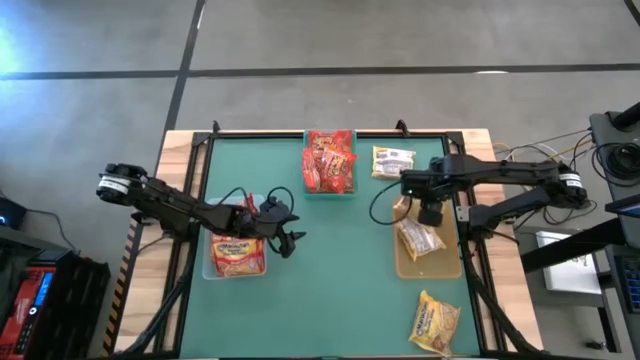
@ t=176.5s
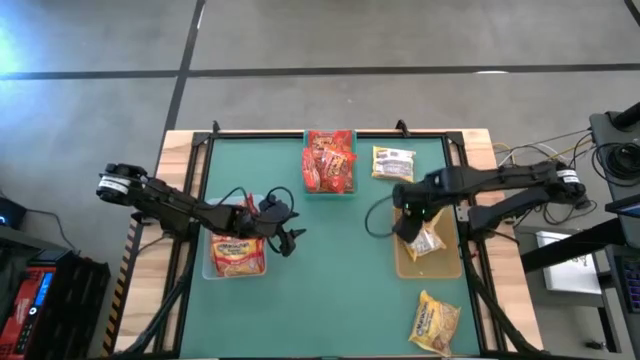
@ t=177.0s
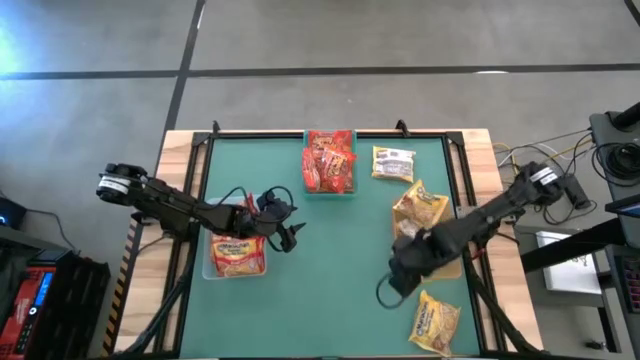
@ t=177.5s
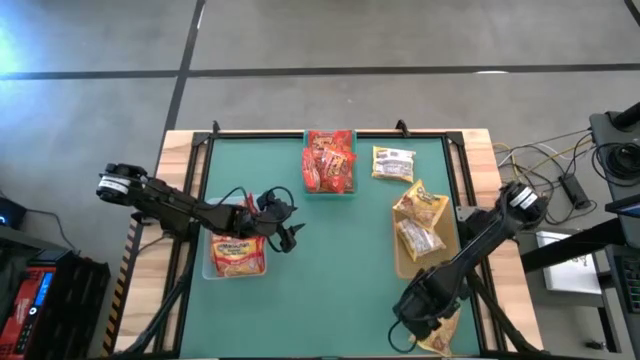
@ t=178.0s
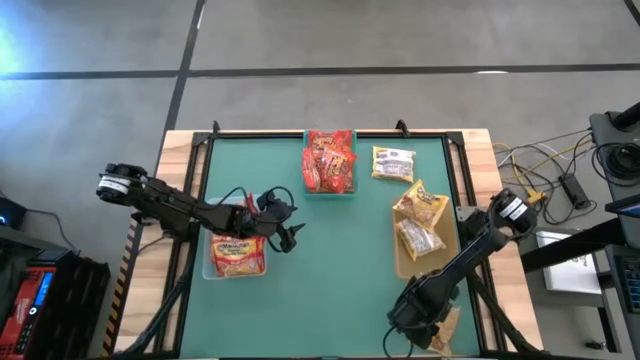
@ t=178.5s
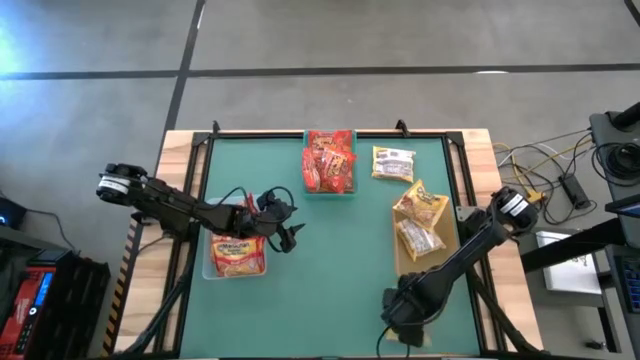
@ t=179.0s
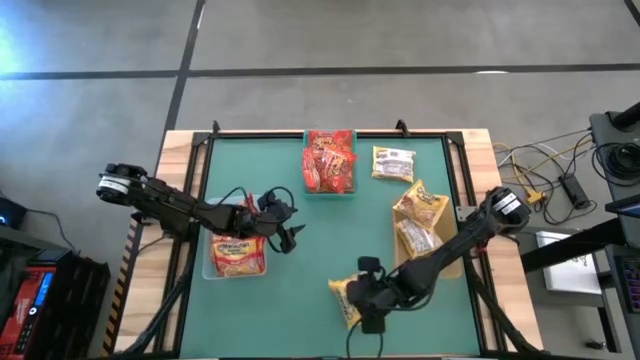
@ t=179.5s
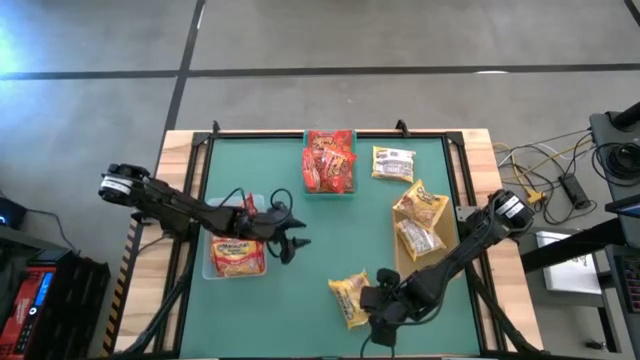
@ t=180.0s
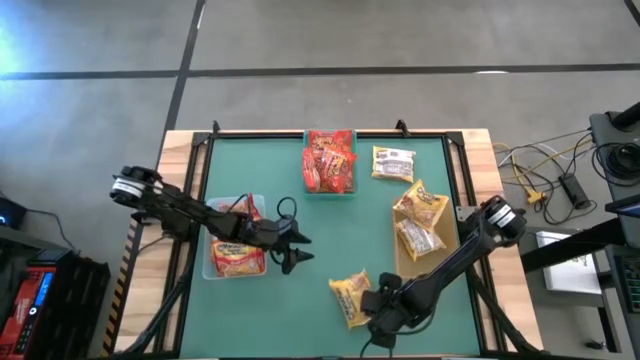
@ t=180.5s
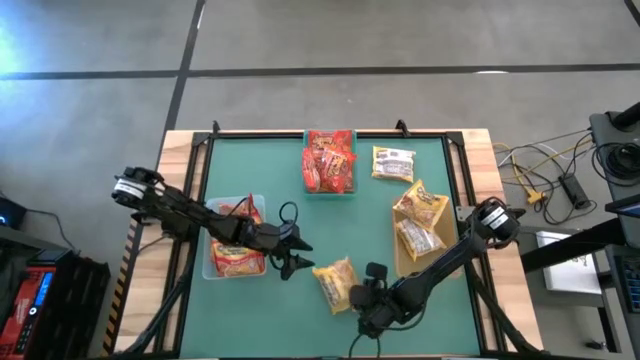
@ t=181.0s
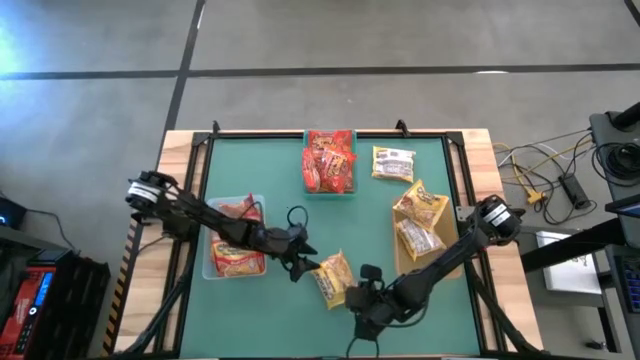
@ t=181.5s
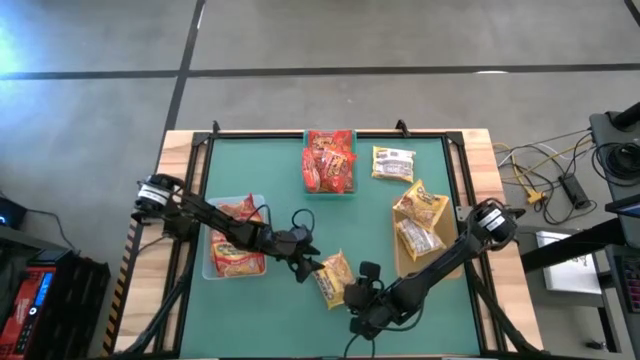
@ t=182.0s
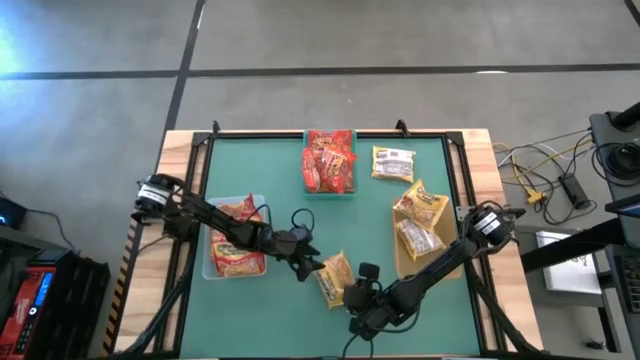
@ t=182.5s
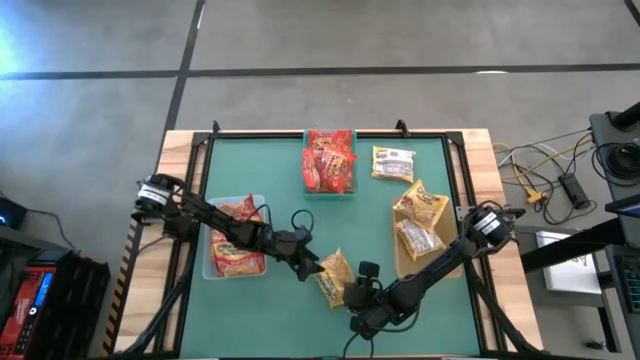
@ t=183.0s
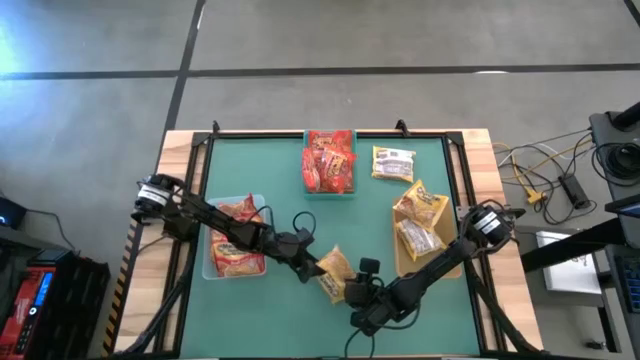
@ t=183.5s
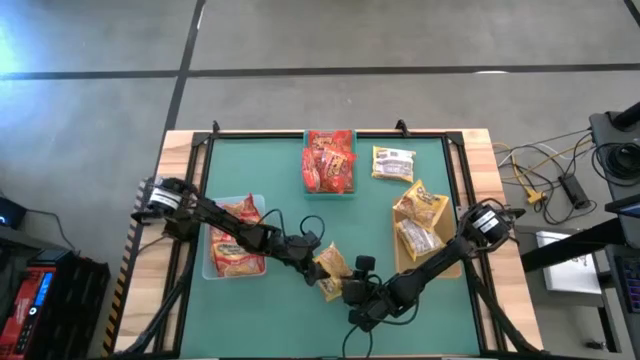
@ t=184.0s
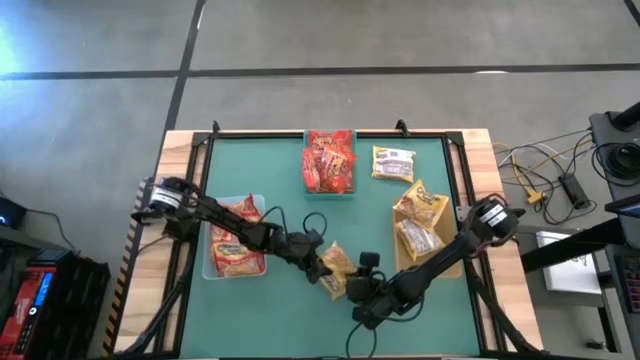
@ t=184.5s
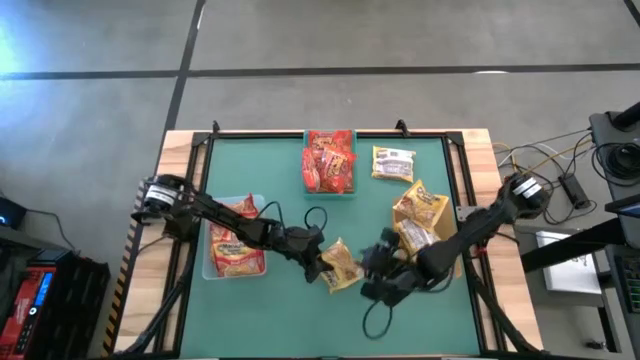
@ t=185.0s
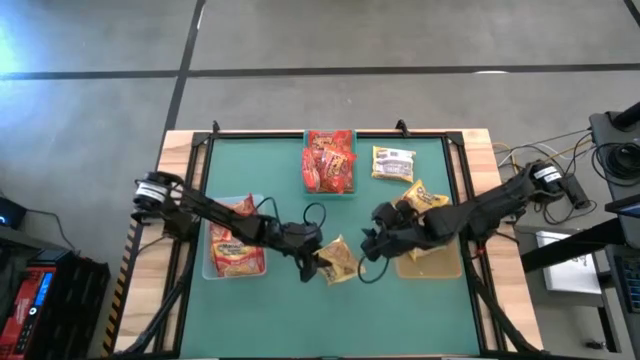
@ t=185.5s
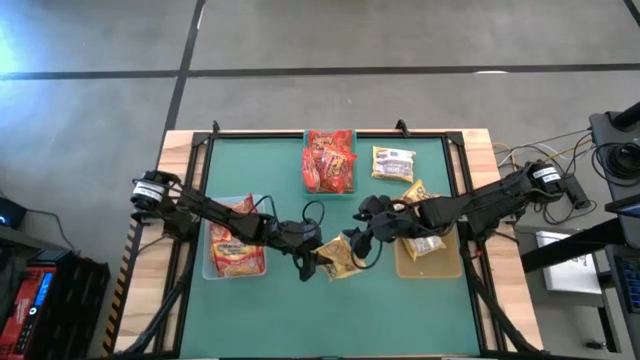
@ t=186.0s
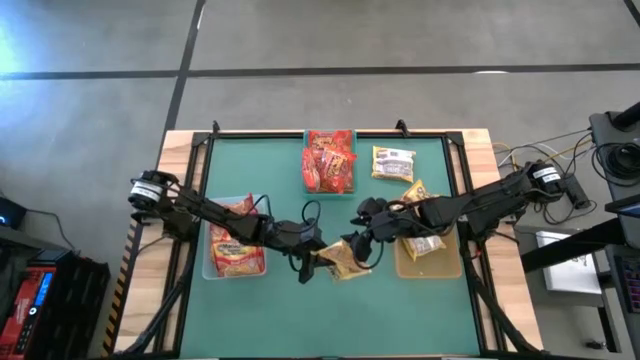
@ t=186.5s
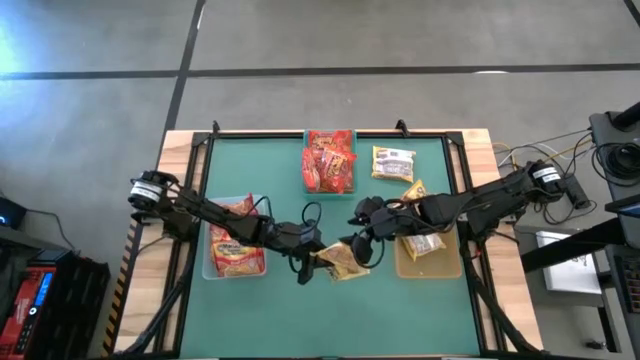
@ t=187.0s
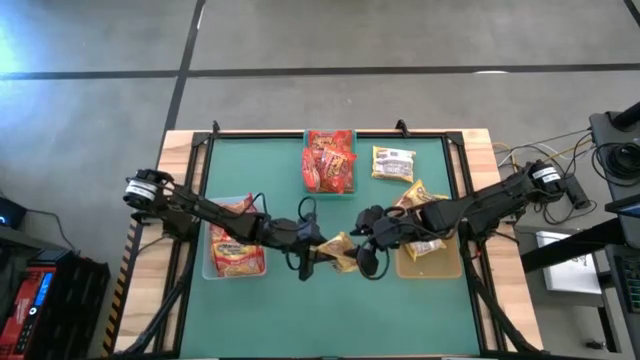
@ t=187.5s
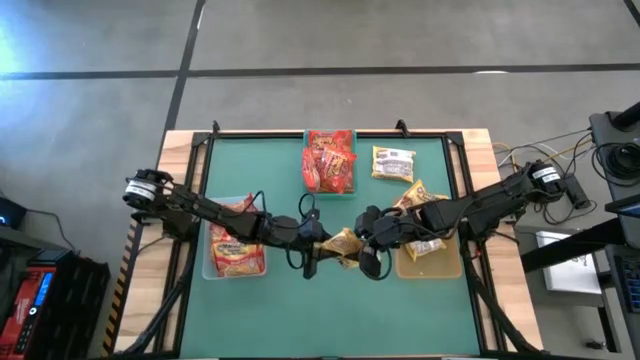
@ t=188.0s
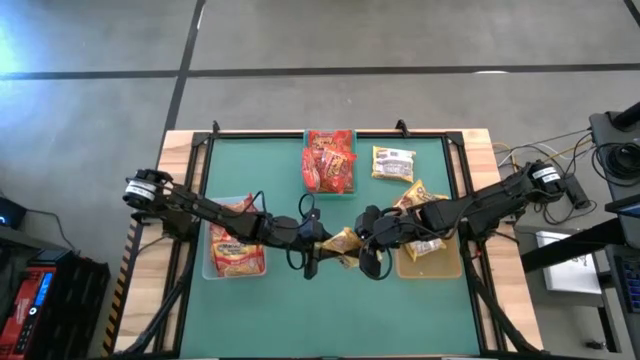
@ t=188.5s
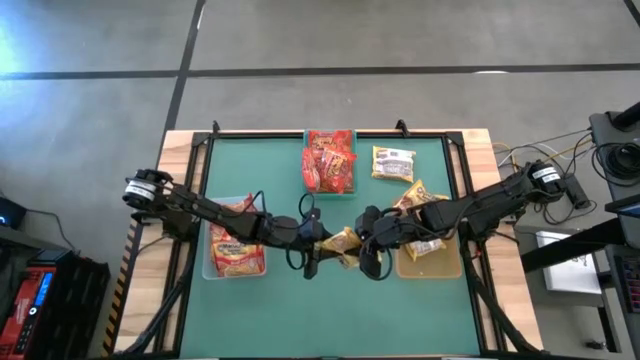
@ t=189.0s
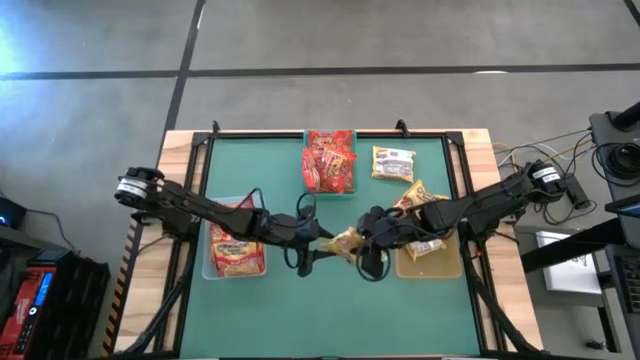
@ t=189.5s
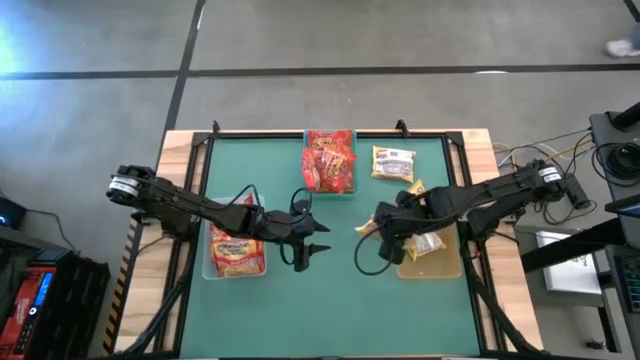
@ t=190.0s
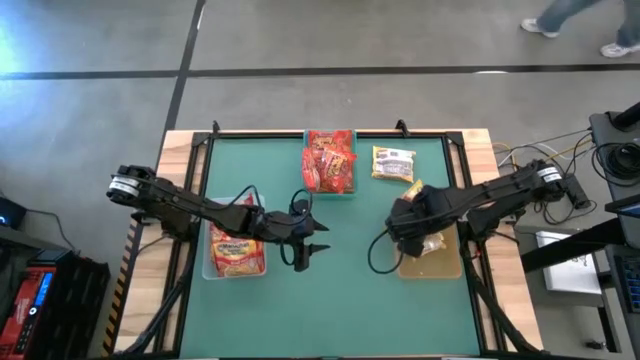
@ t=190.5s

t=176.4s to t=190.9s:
Task: Sort Maruchan noodles
Put the yellow noodle pack into the yellow bin

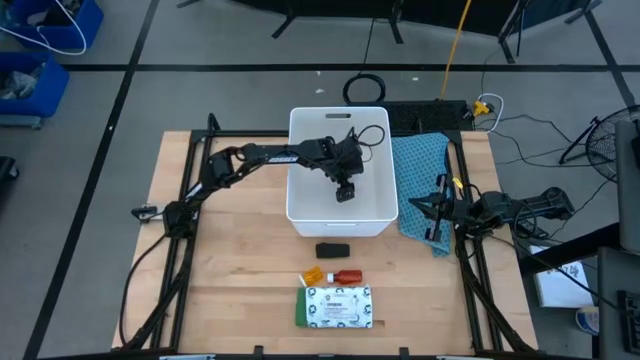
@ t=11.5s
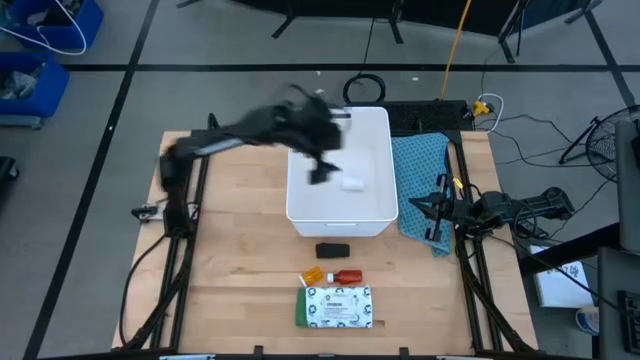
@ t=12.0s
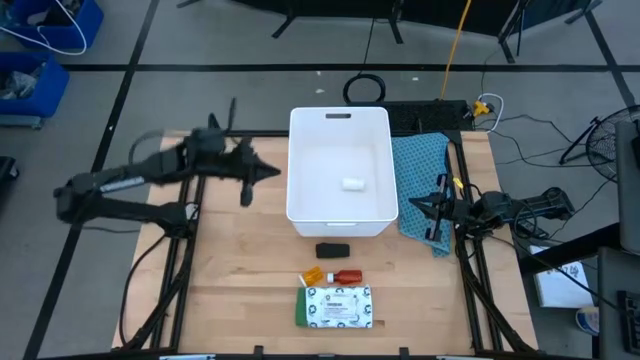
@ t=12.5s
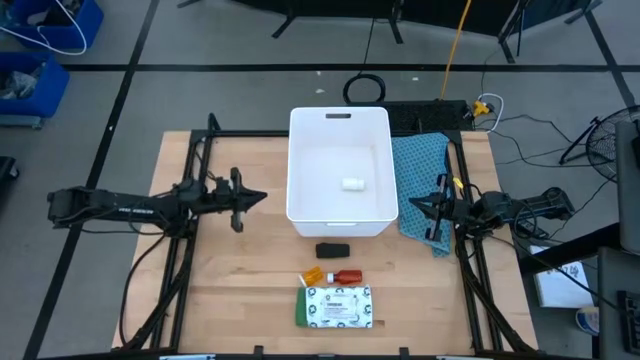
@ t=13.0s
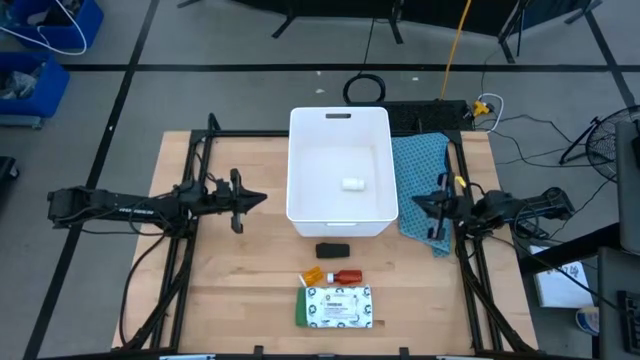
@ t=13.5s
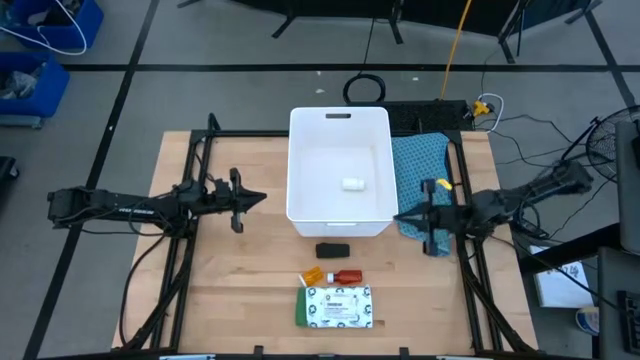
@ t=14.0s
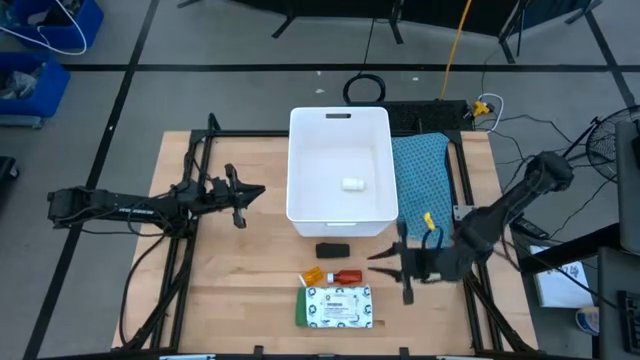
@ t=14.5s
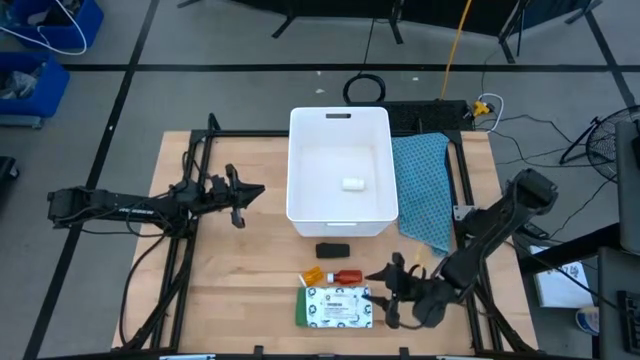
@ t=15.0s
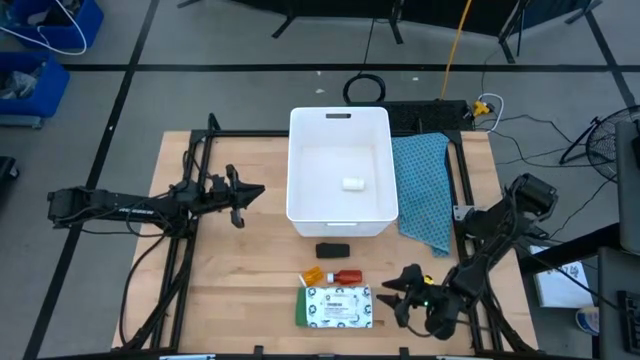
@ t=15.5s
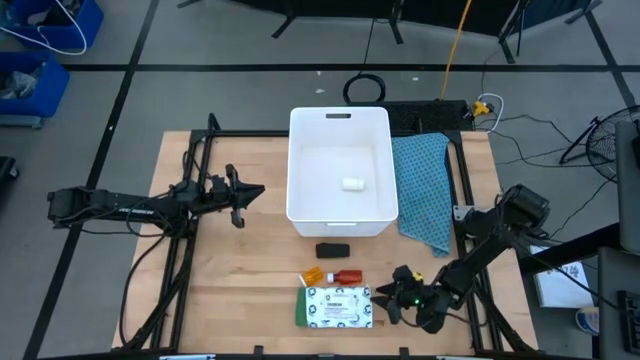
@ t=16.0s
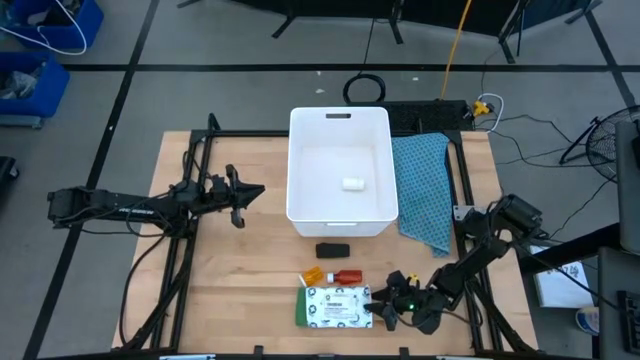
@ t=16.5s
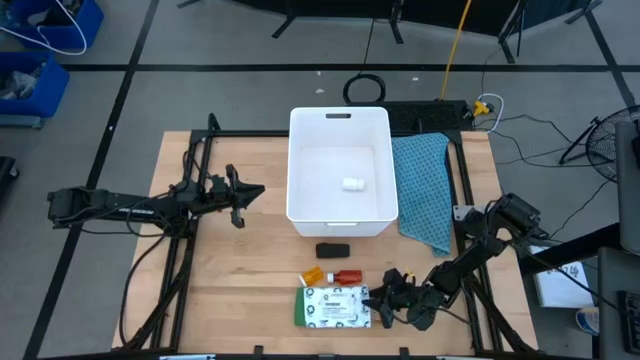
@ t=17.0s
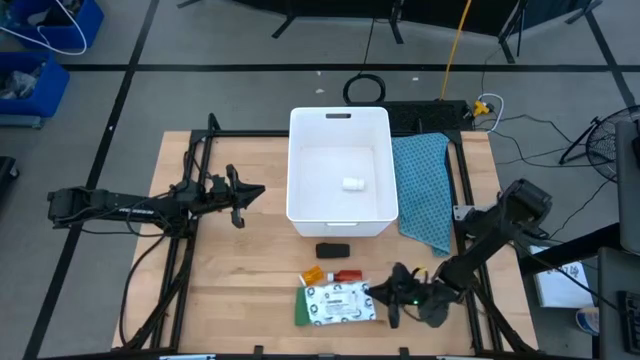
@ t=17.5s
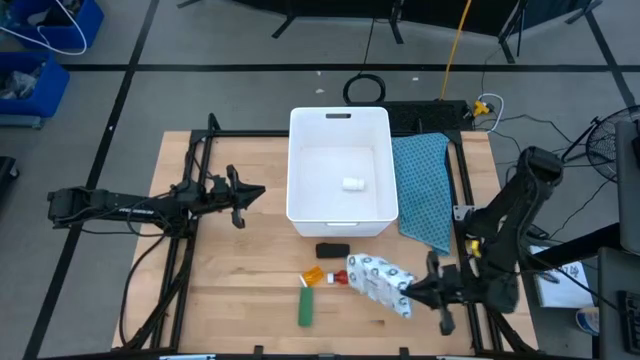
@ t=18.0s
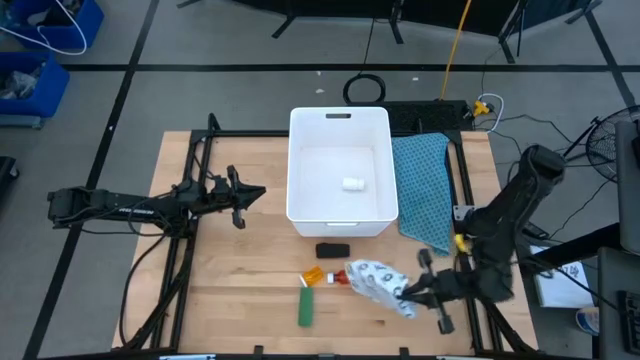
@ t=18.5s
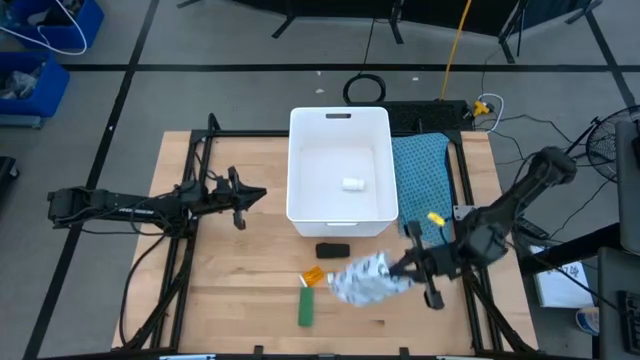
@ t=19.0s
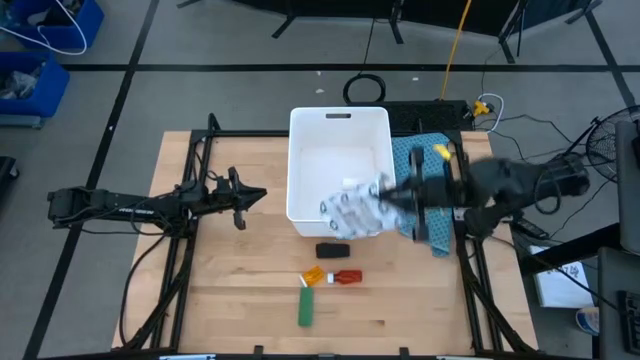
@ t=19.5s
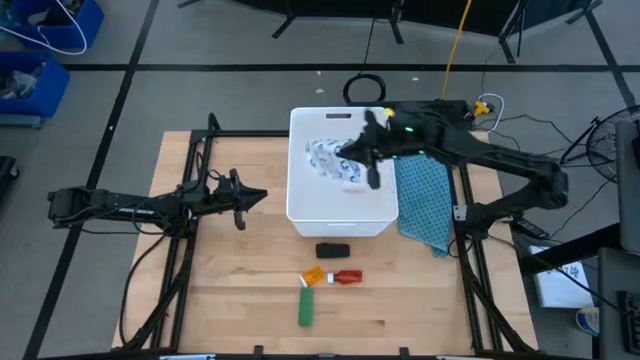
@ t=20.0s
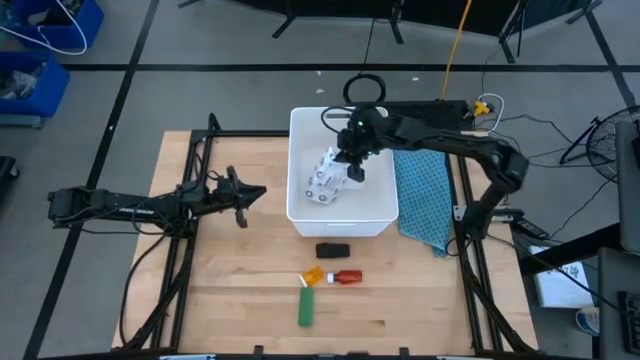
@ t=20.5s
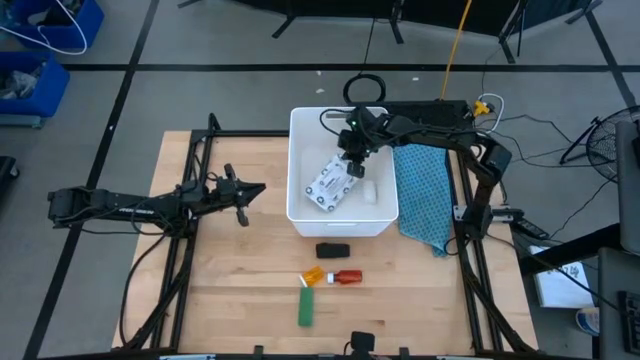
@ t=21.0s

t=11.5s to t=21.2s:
Task: Pick & place medical supplies in basket/bin
Put the white mailer bag into the white bin
